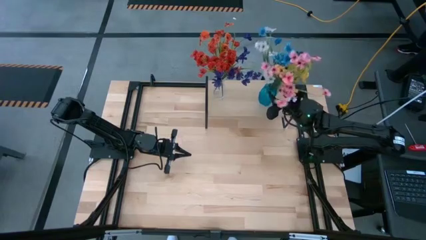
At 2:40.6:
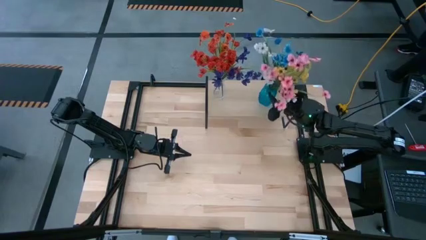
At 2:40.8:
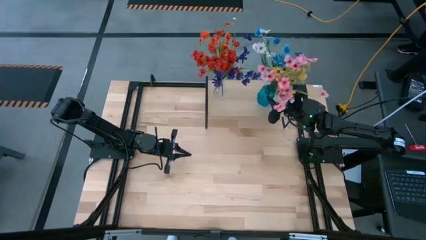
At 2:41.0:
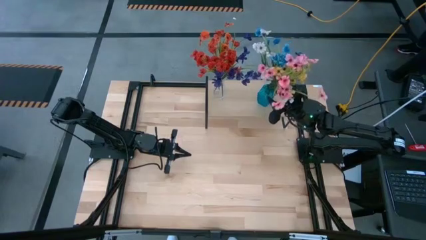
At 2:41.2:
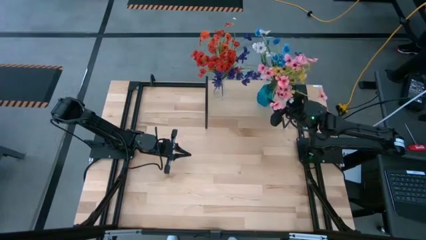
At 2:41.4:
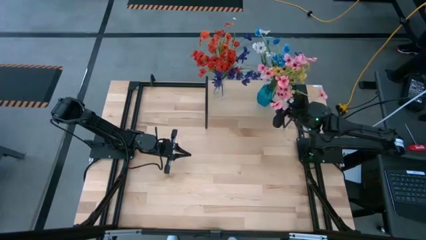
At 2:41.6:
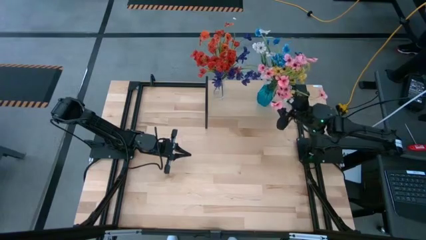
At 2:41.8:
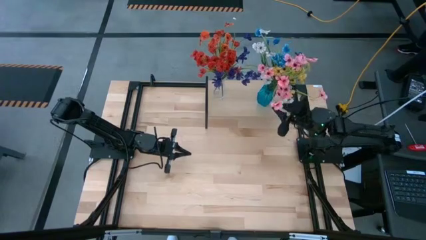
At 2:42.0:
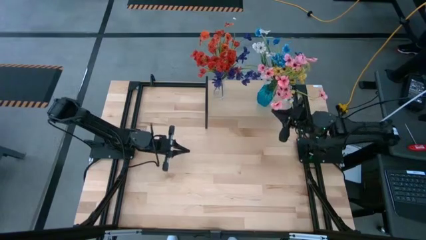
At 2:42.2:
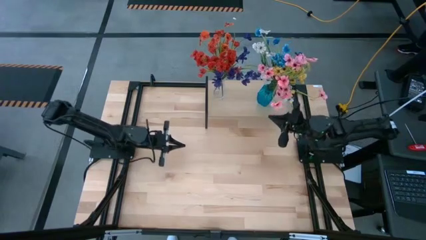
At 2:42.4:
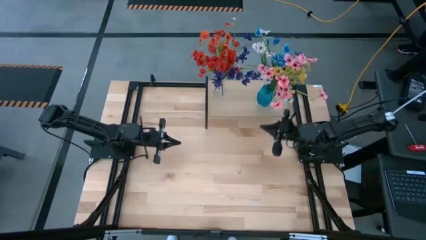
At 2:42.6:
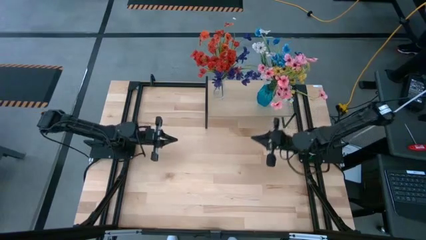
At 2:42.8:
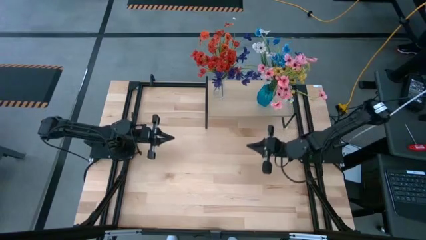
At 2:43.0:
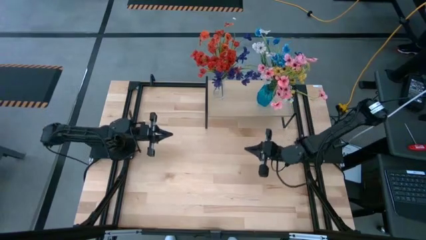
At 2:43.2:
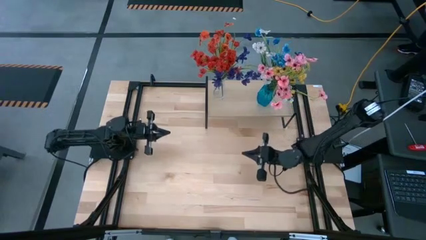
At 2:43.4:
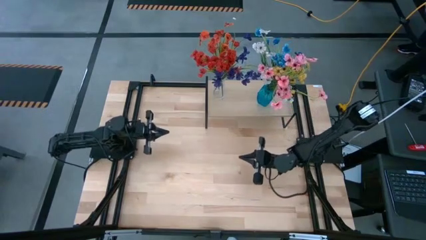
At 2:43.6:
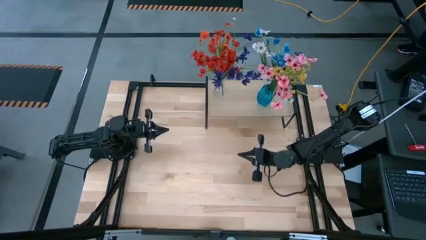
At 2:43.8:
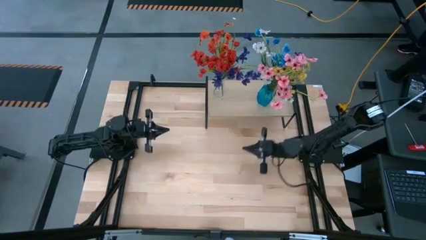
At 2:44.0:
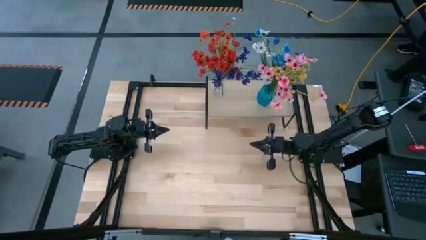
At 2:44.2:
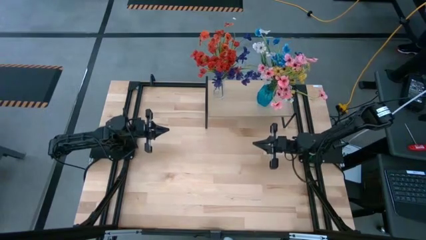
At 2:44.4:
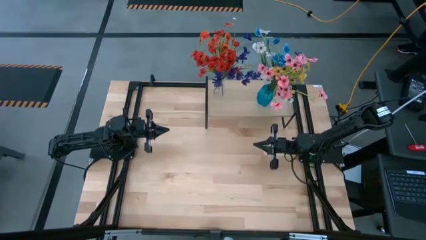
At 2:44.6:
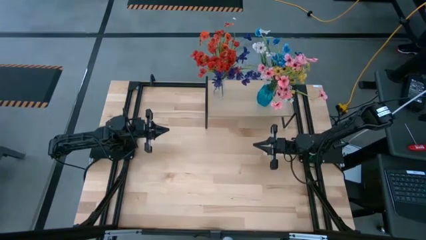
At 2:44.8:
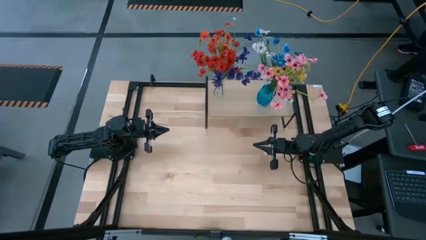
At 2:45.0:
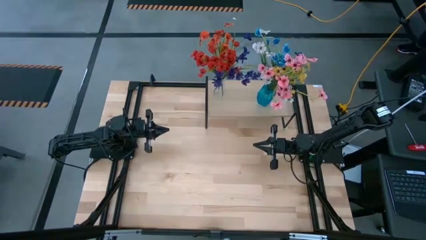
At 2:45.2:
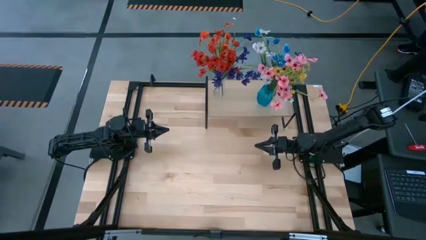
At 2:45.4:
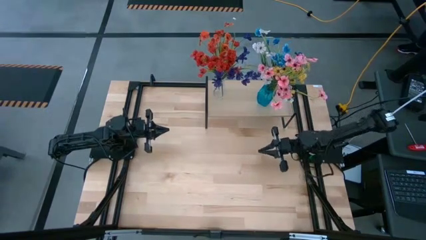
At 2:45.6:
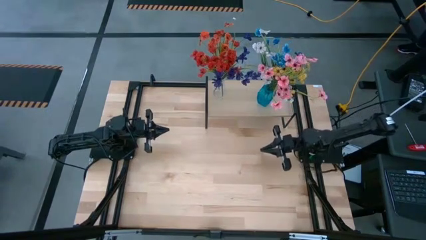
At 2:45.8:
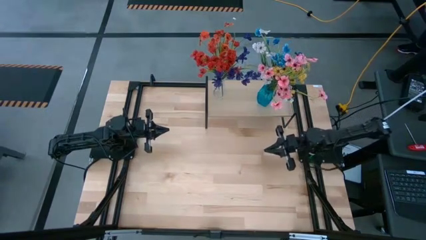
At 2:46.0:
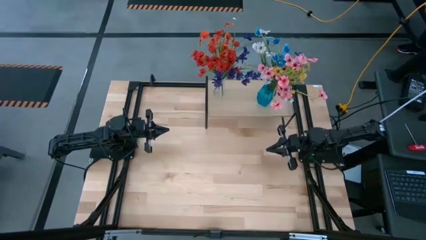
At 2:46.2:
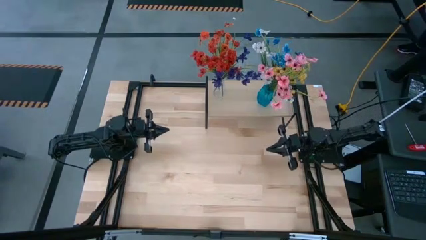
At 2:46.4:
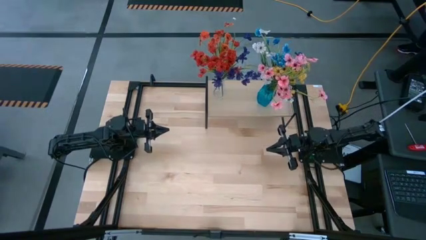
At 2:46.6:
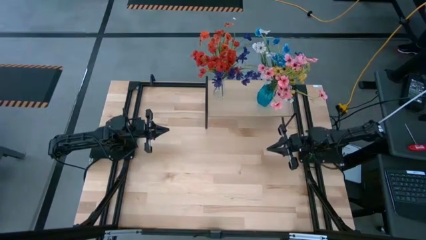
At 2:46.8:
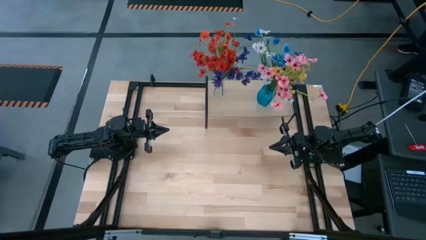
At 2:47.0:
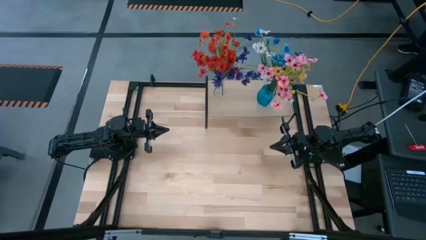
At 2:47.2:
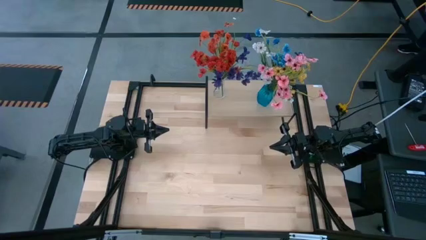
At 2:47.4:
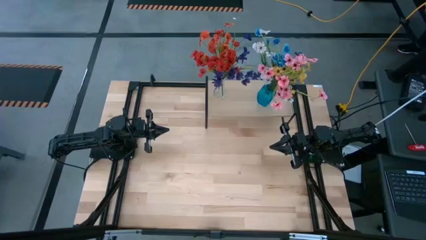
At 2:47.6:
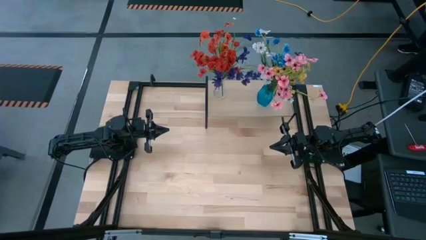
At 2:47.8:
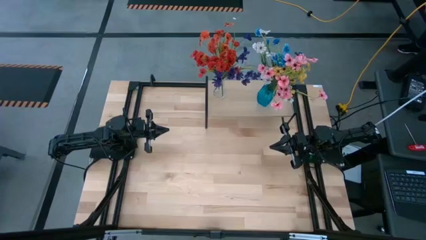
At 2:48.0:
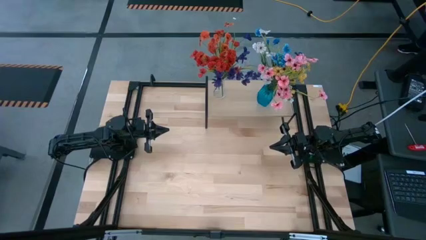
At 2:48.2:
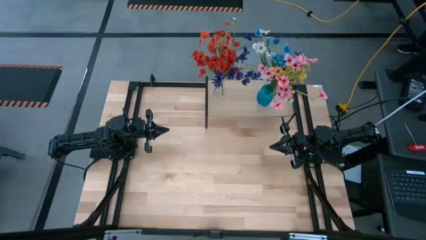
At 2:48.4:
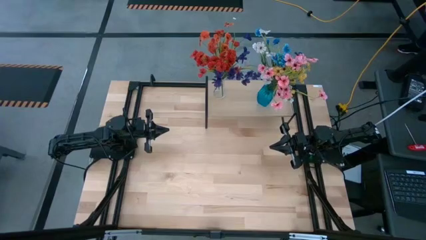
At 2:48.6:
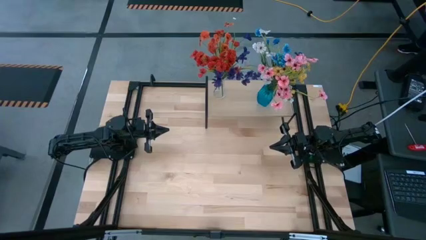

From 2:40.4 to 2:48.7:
Task: Pick and place flowers into a vace then onto a shelf
Return to Home Position
